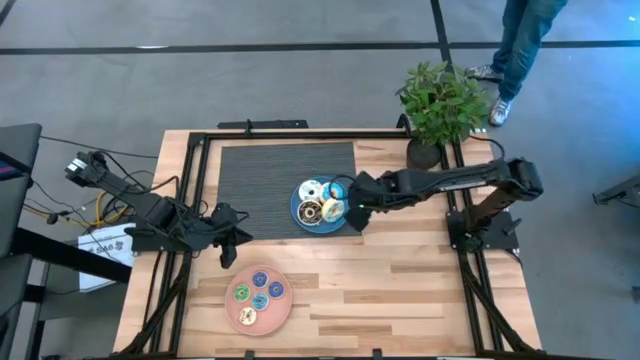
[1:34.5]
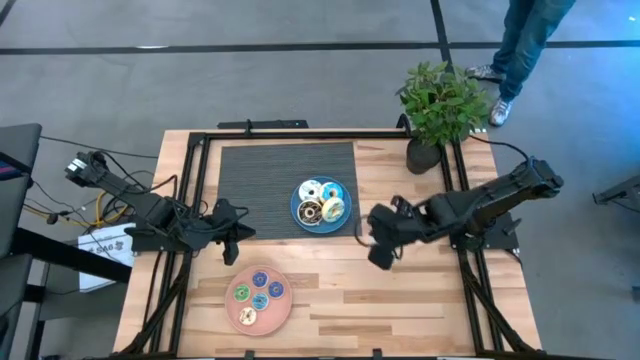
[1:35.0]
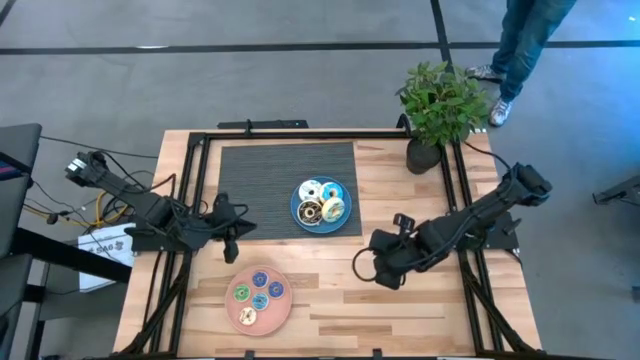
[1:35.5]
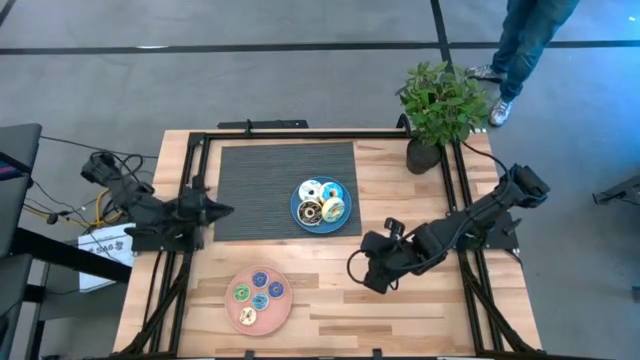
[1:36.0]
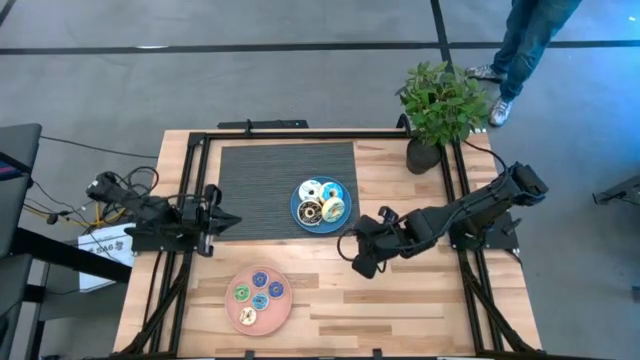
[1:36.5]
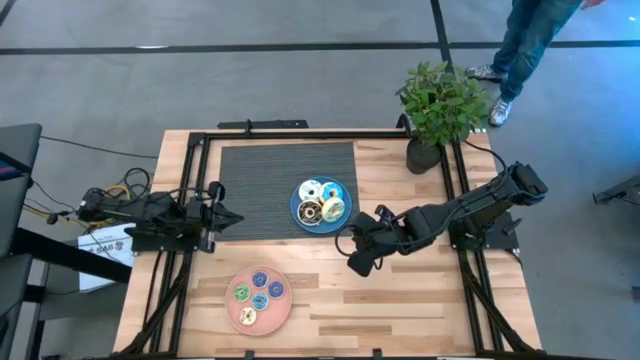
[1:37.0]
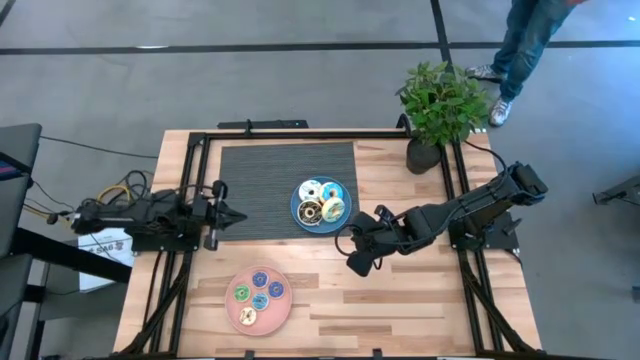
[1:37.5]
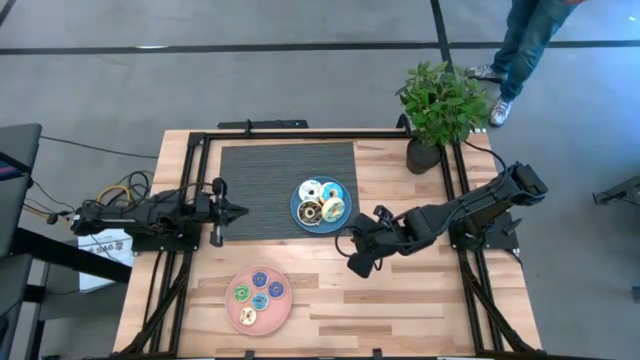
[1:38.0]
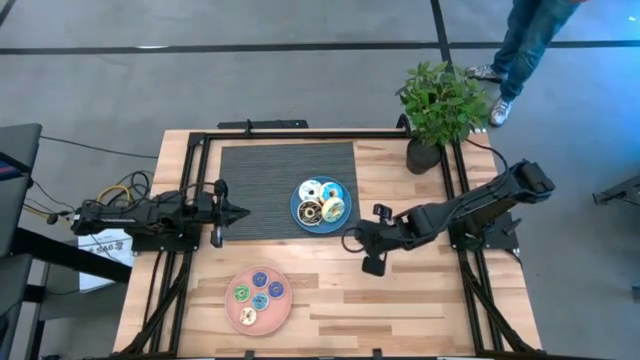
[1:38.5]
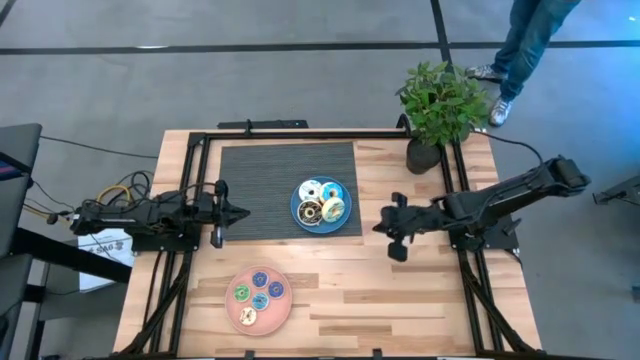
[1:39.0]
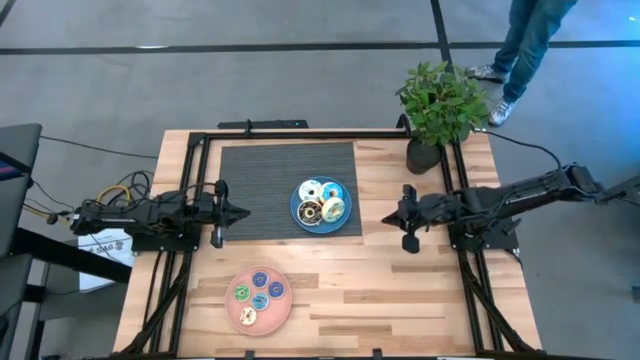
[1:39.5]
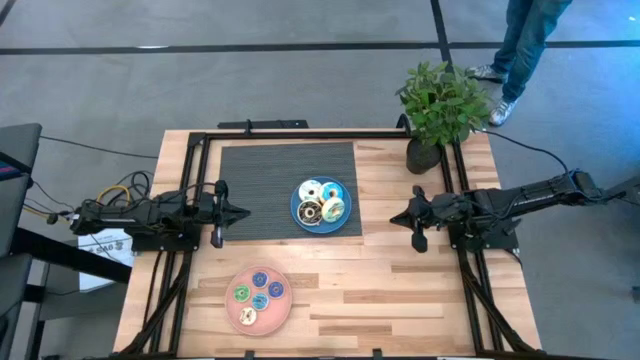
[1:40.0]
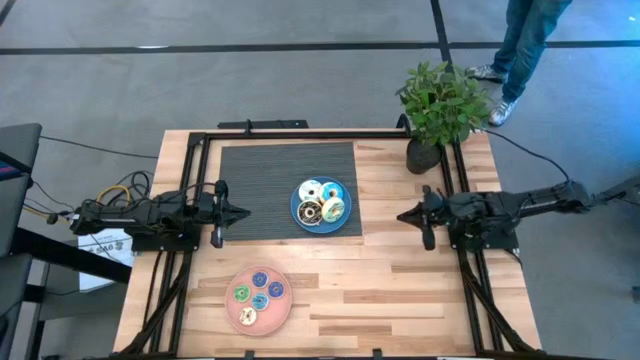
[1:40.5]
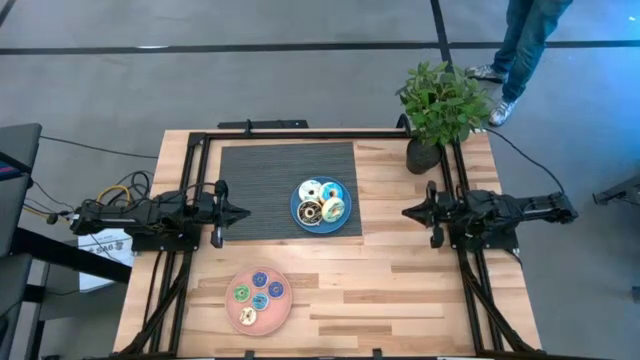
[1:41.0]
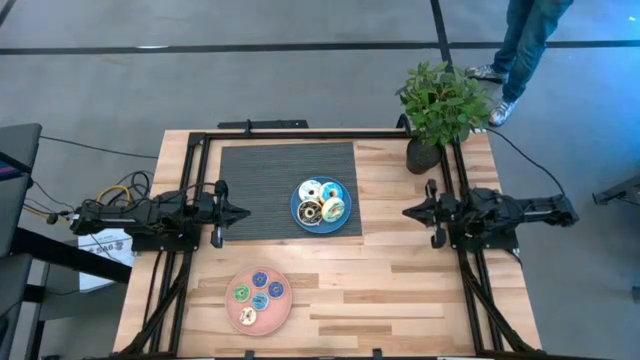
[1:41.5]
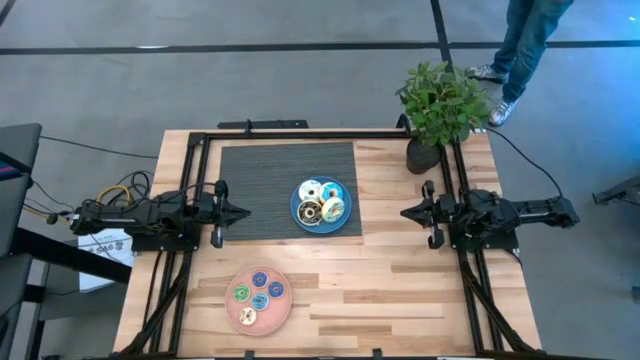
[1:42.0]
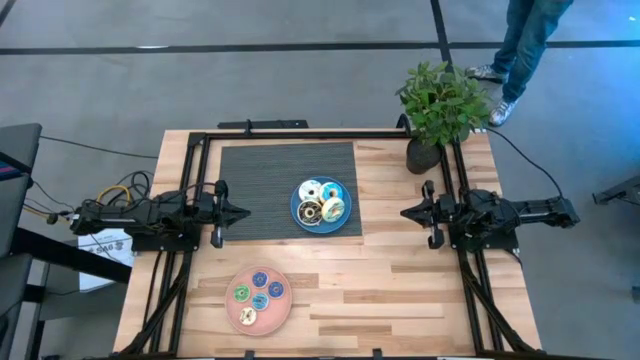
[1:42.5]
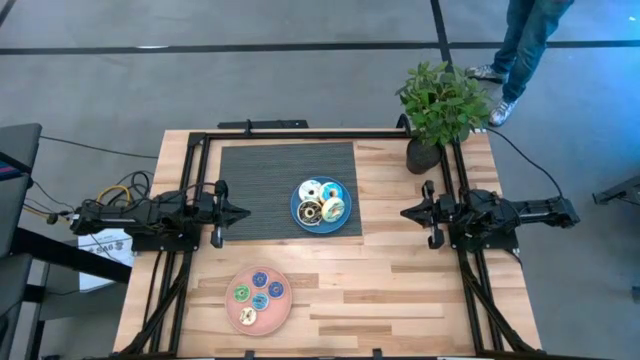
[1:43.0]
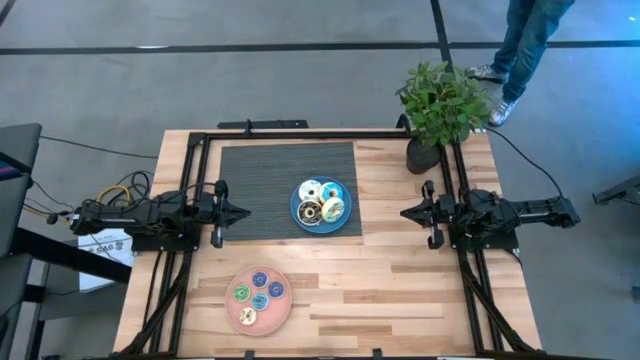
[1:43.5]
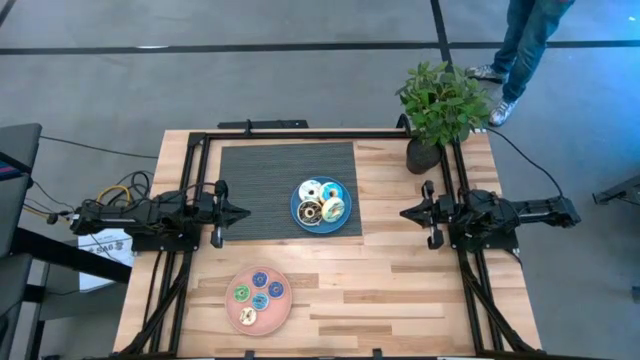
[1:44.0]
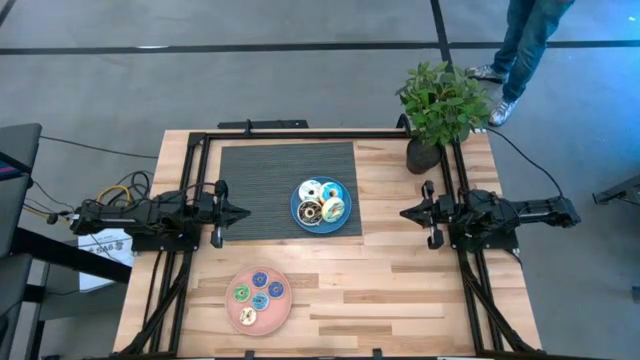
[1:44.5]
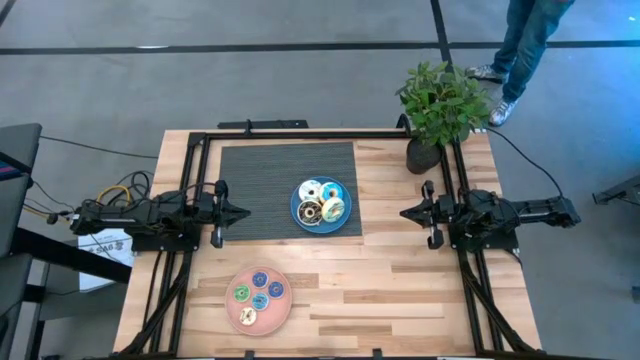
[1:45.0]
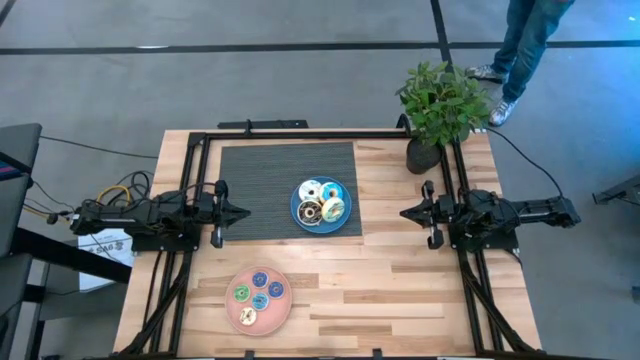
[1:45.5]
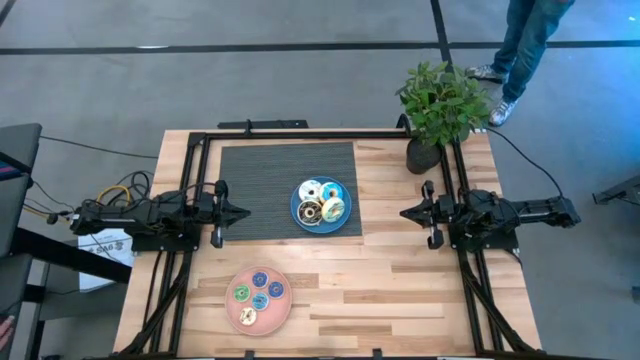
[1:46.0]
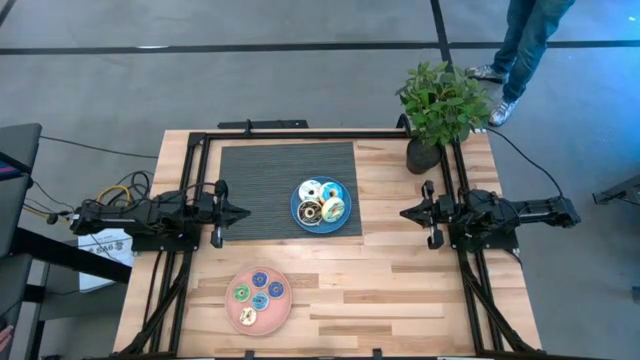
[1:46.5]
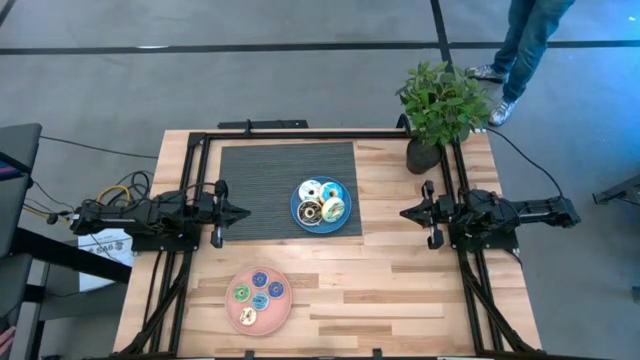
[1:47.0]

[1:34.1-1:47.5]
Task: Pick & Place donuts
Return to Home Position

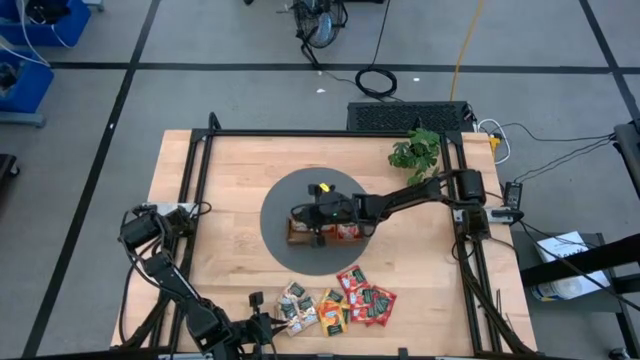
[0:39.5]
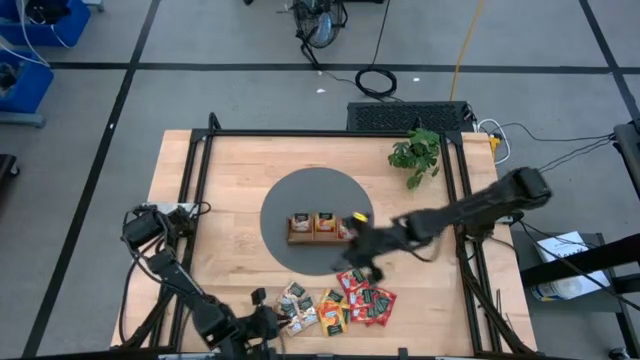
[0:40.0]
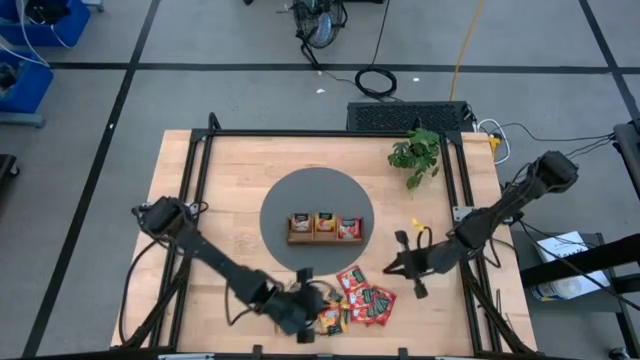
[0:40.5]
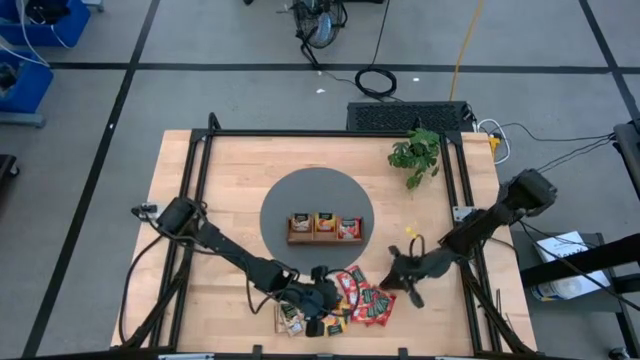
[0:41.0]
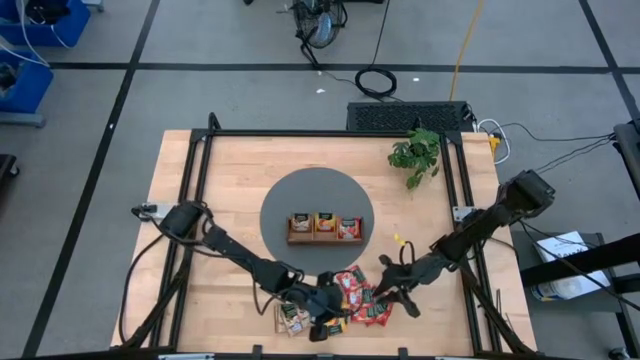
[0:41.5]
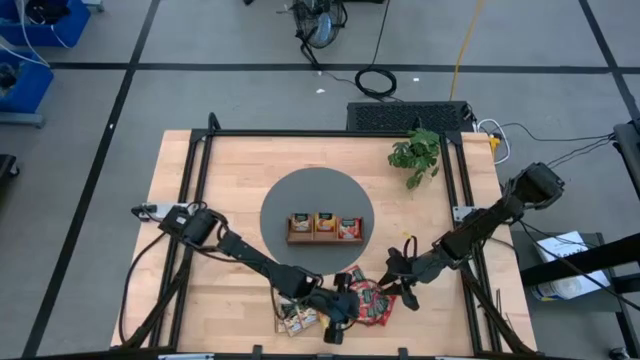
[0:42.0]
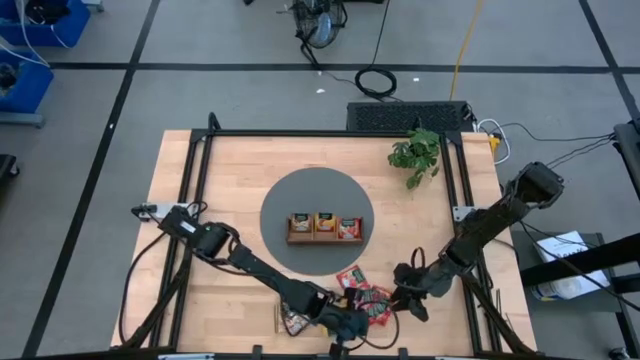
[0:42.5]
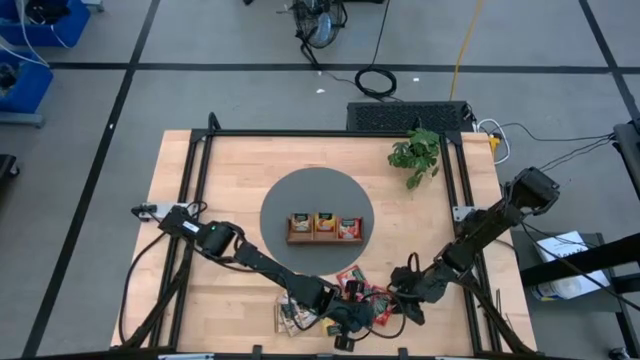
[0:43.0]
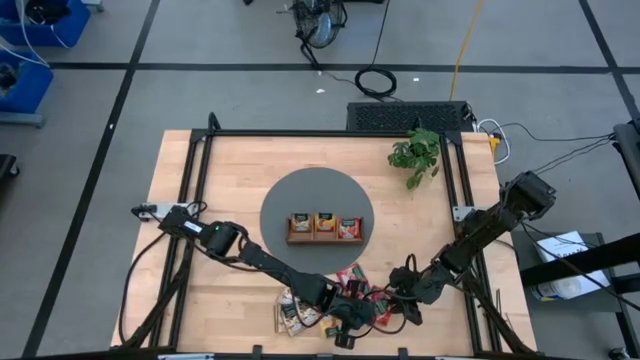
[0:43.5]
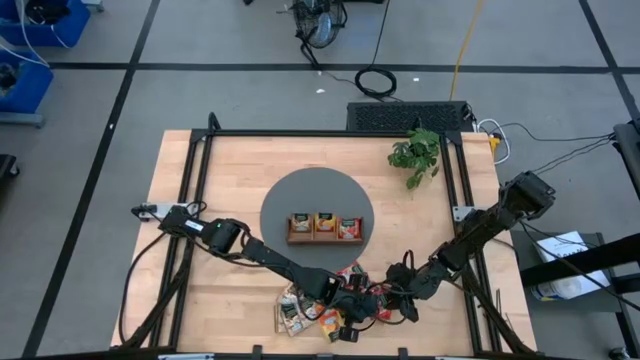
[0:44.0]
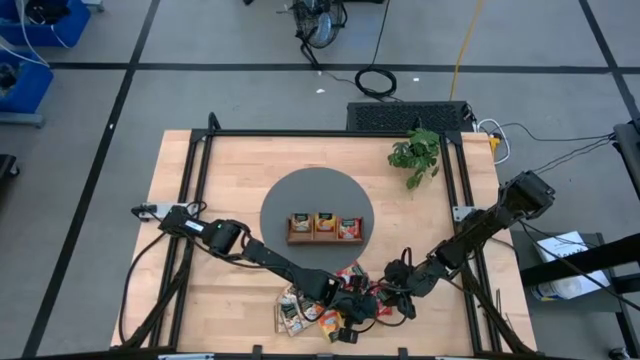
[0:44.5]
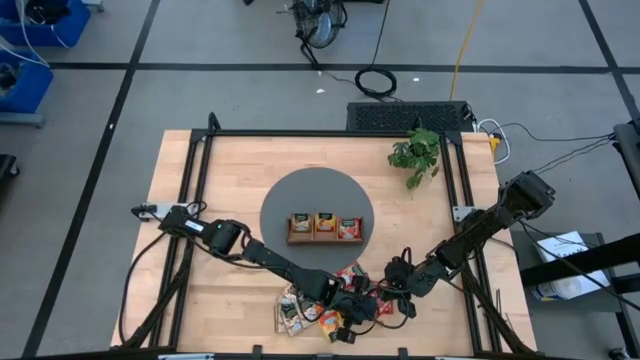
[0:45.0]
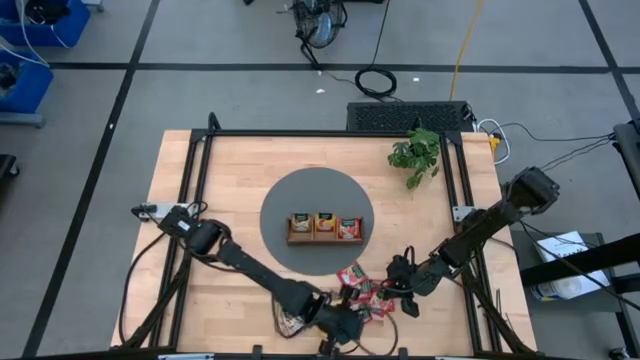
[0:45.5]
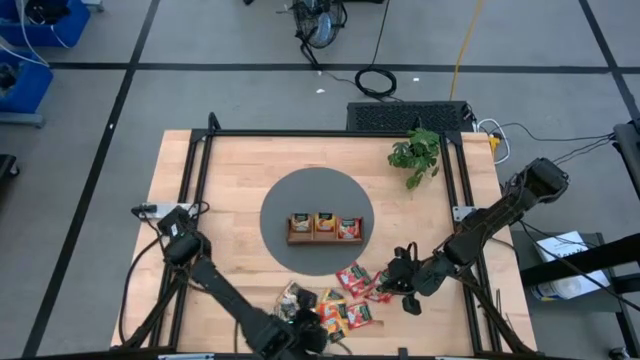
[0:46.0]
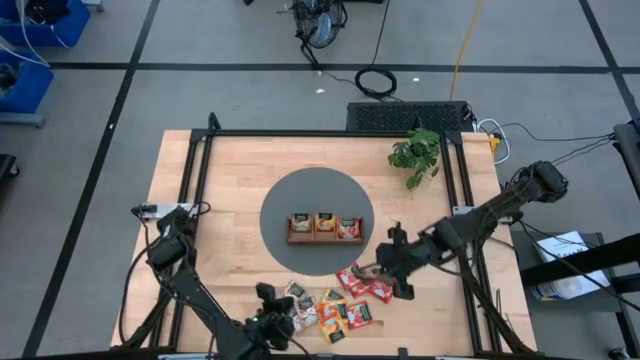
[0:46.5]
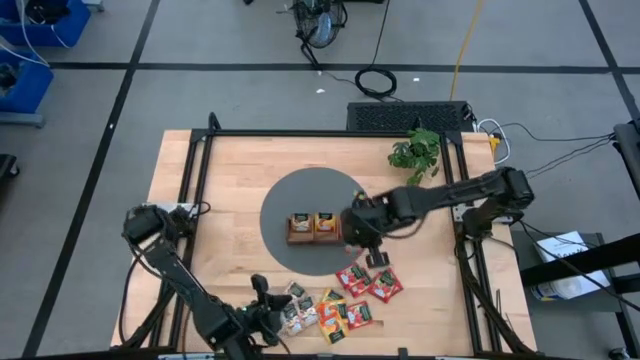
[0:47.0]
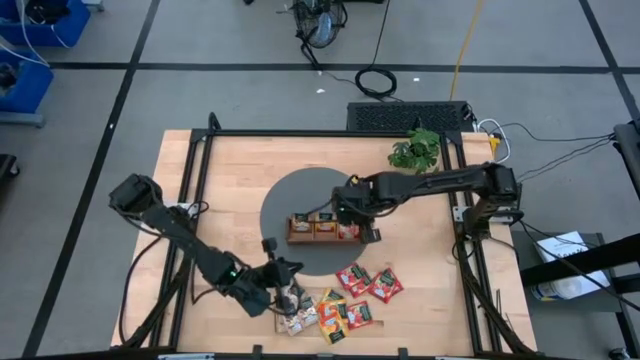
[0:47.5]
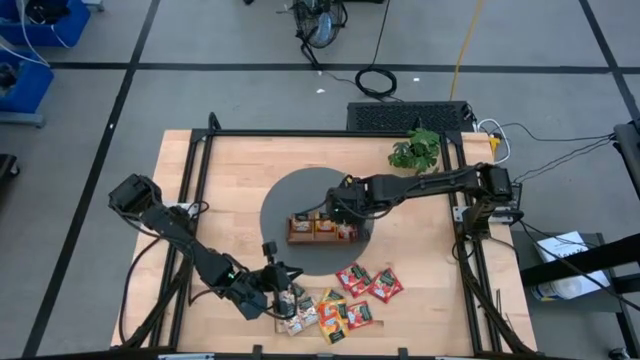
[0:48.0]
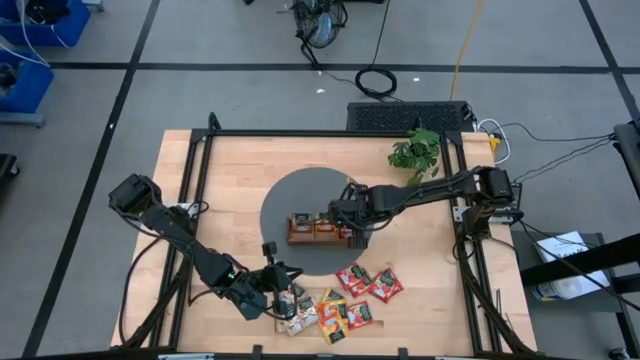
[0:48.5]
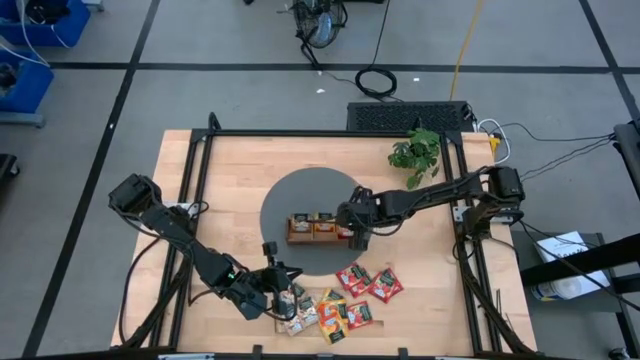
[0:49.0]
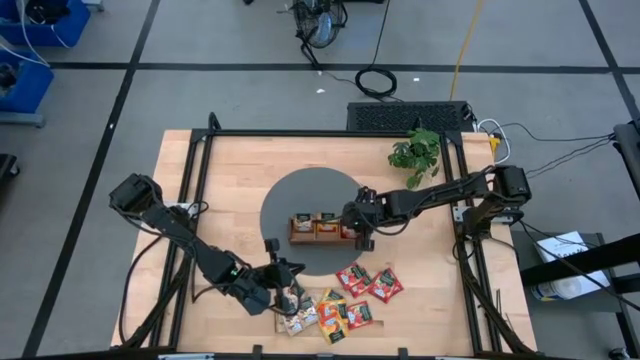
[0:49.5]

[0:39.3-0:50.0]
Task: Pick & Place Tea
Put the strawberry tea sachet into the right compartment of the wooden organizer
